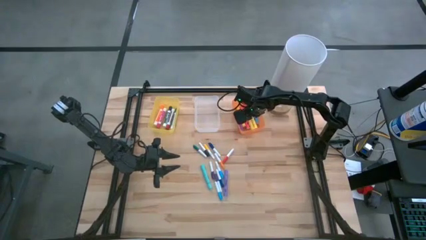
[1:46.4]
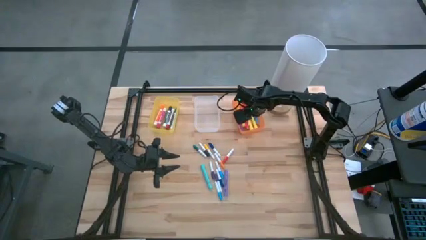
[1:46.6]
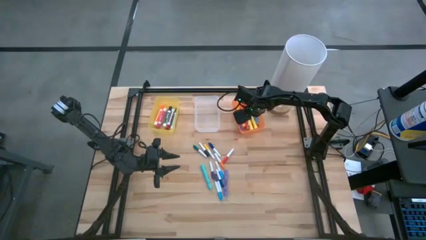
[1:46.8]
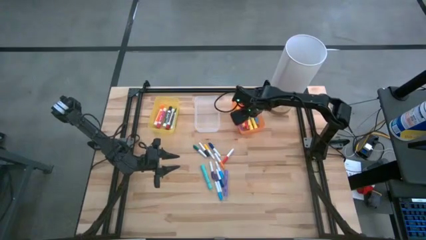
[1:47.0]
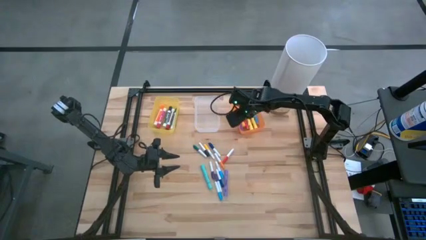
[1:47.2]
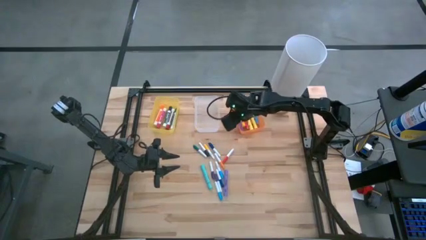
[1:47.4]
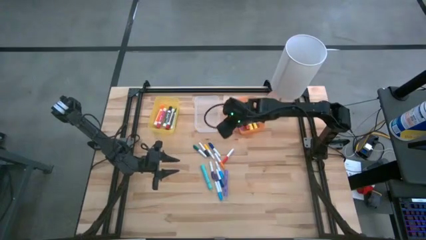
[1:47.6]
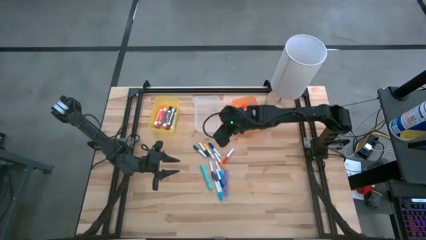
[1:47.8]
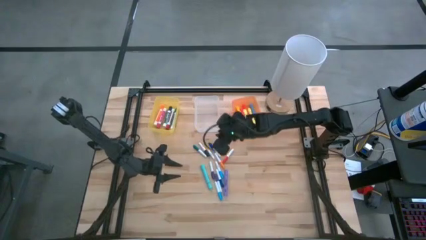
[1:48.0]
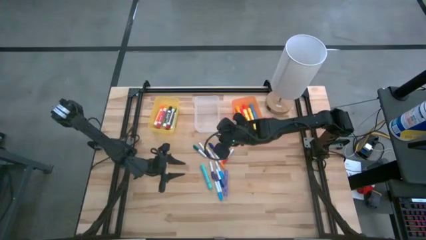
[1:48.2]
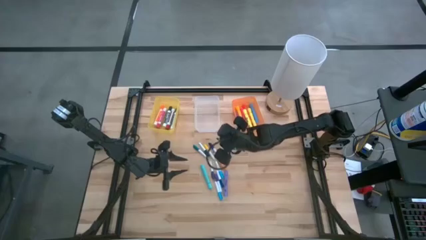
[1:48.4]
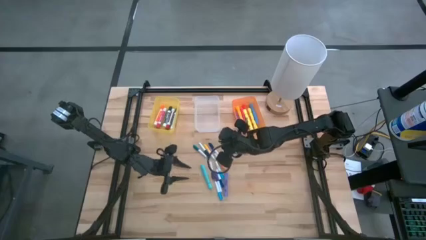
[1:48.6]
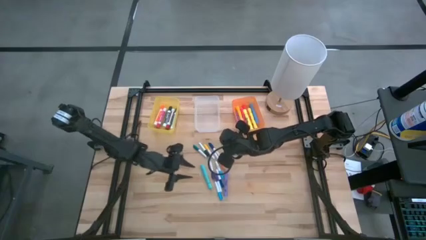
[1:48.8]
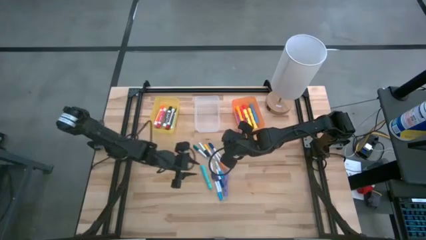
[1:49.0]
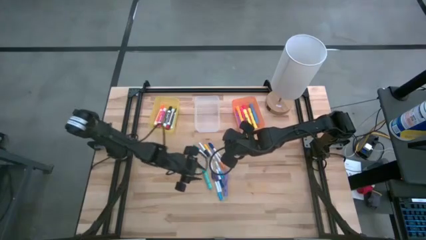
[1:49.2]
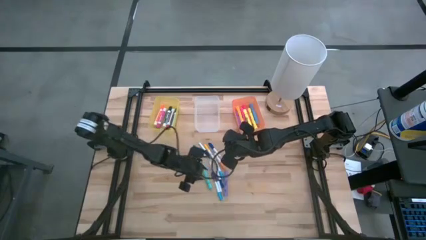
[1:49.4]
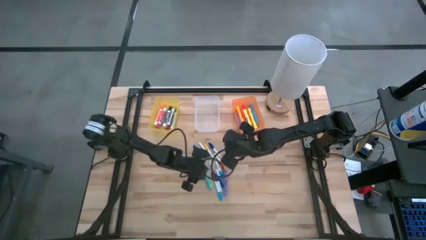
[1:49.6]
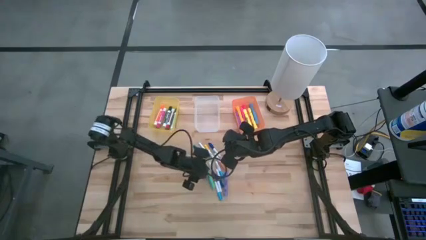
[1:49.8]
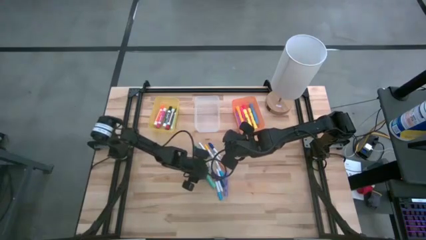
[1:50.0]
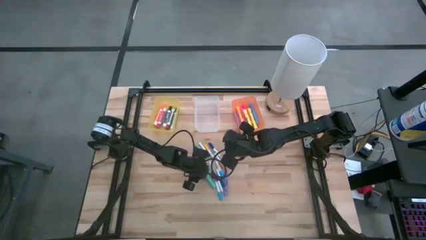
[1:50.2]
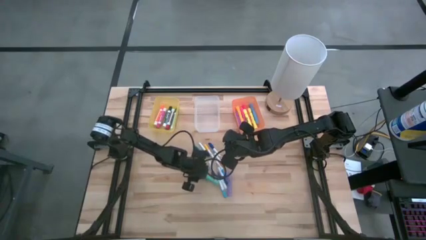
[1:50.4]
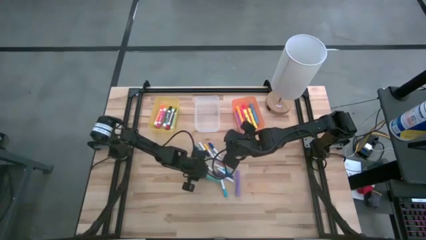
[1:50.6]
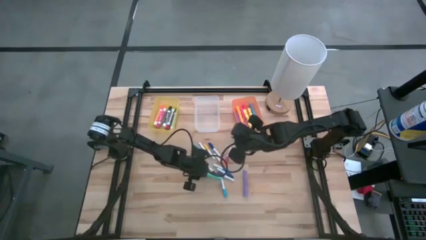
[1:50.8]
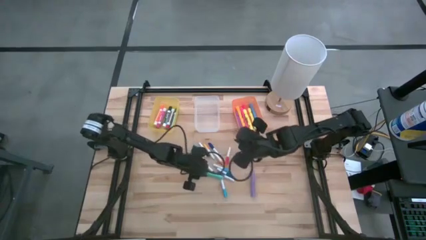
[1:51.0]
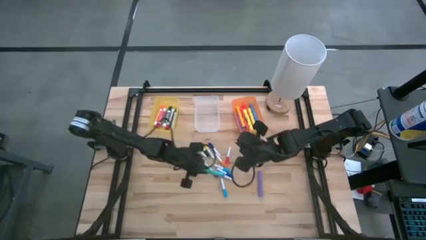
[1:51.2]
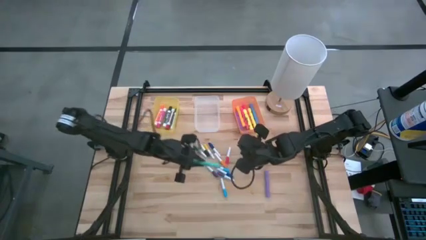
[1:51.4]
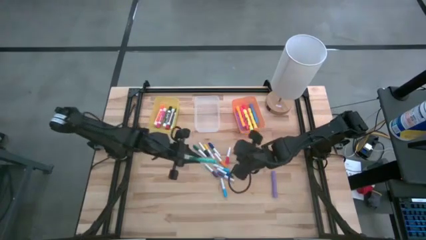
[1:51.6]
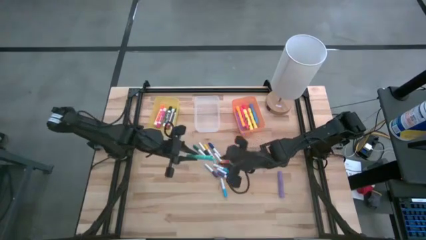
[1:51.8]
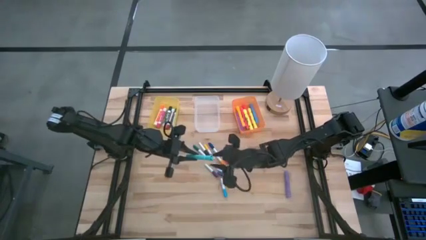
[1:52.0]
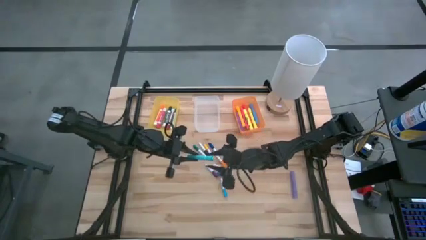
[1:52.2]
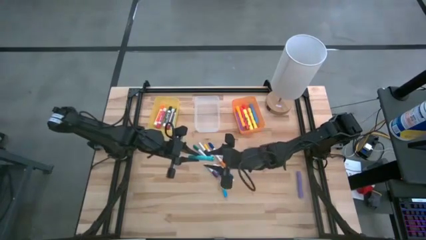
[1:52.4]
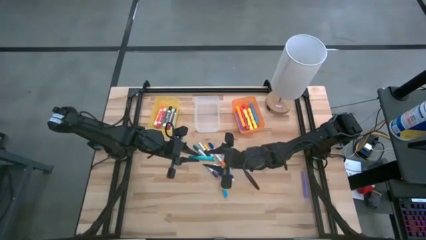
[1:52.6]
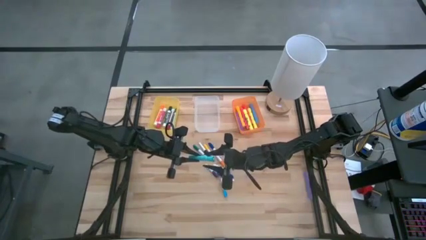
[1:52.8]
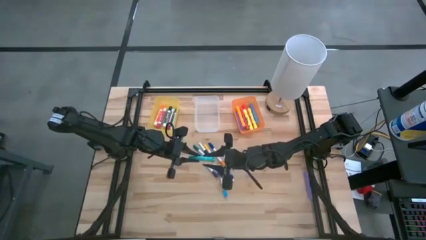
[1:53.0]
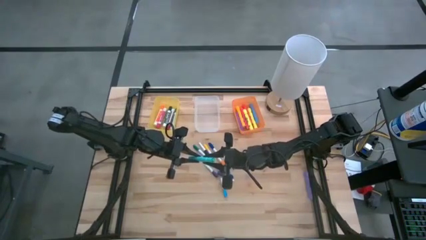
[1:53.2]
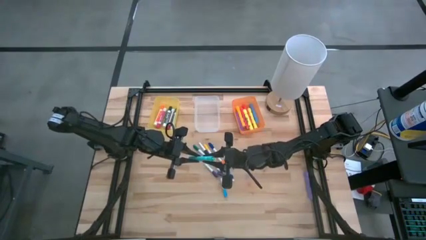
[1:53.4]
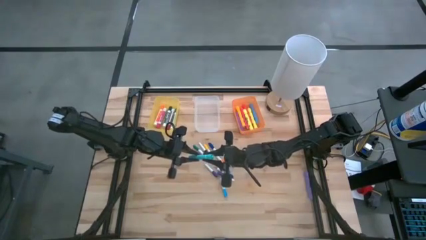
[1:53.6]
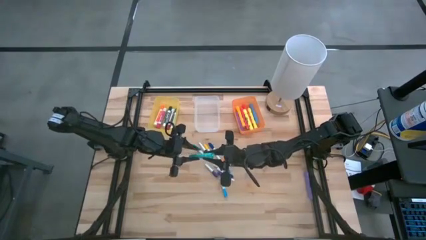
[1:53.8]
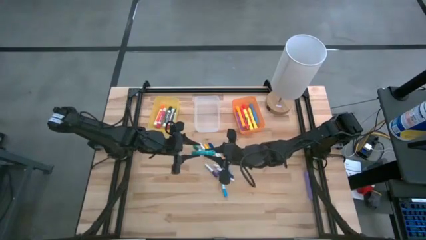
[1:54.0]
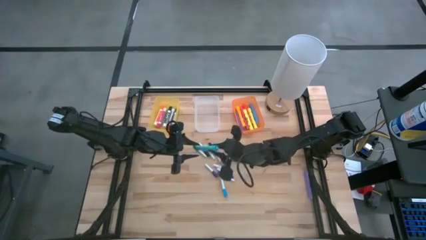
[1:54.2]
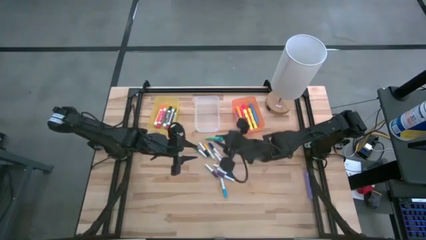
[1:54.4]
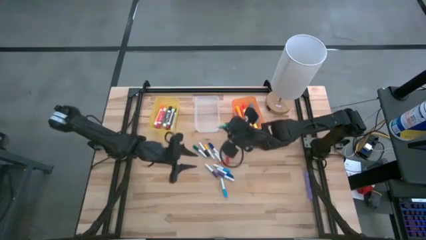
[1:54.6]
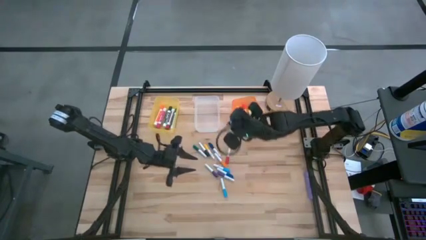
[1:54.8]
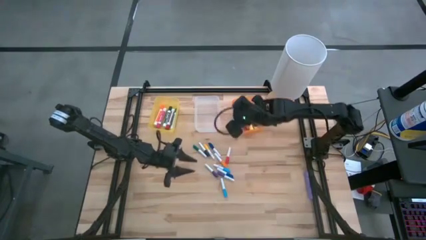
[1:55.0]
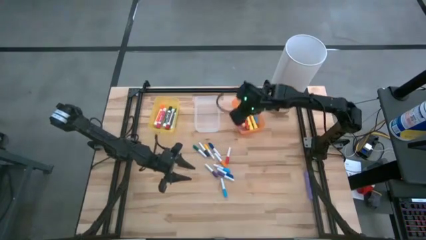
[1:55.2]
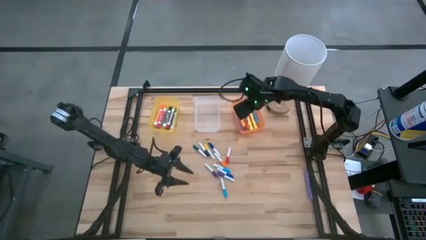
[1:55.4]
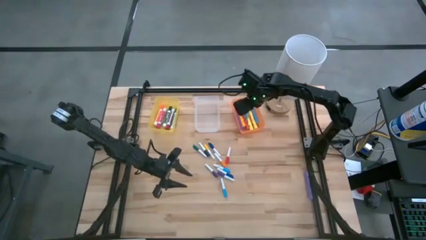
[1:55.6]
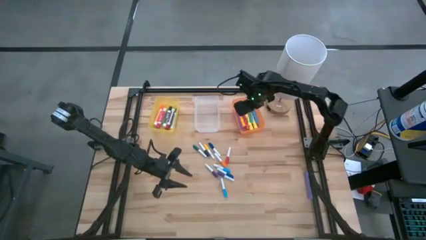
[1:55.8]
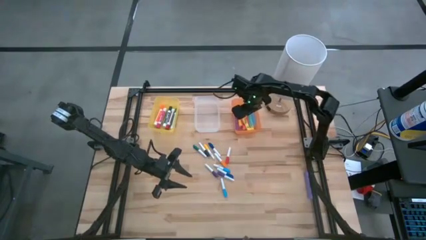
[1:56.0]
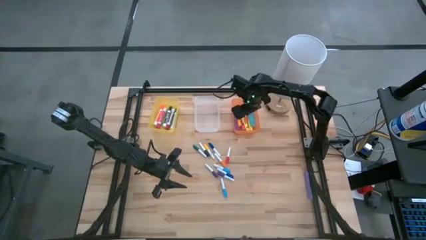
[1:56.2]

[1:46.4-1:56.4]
Task: Pick & Place Markers
Put the large light blue highlighter pen into the orange bin

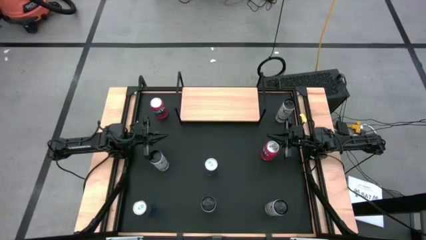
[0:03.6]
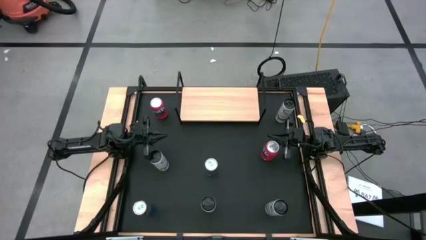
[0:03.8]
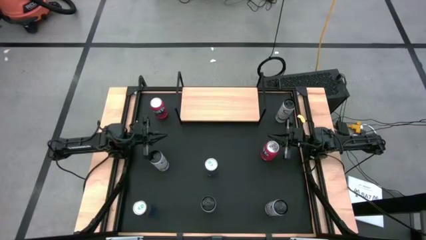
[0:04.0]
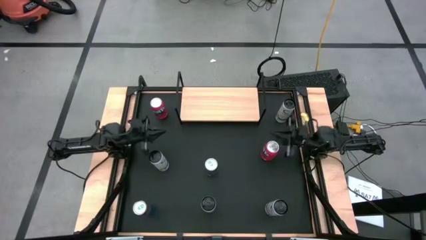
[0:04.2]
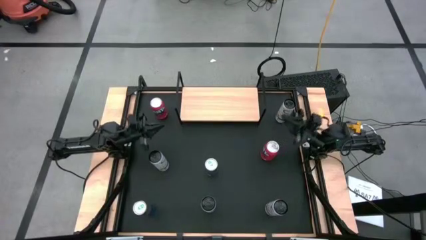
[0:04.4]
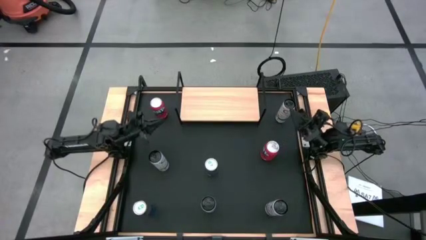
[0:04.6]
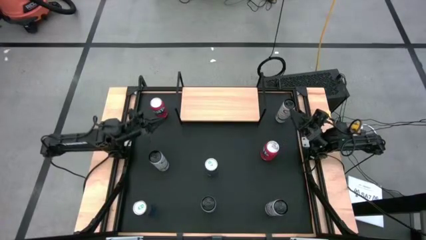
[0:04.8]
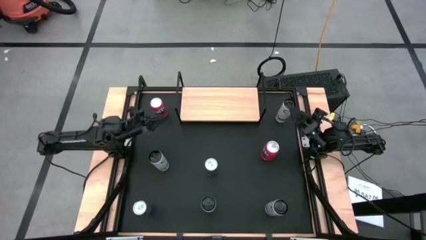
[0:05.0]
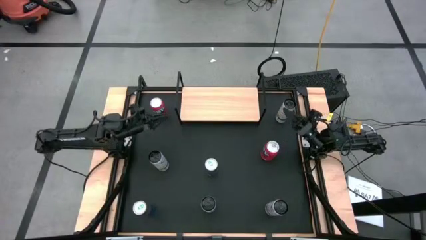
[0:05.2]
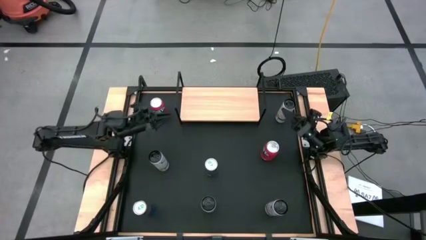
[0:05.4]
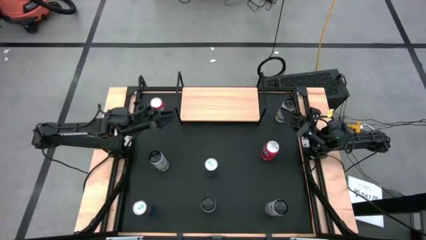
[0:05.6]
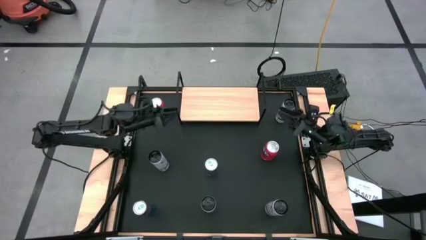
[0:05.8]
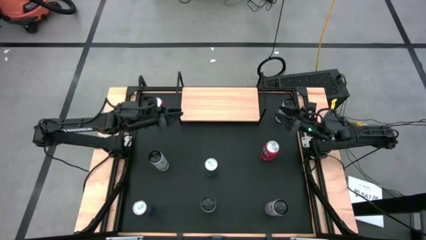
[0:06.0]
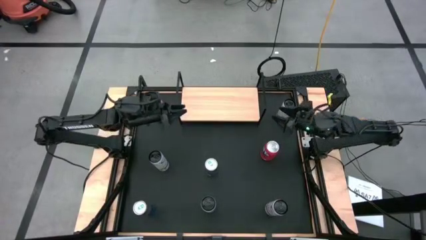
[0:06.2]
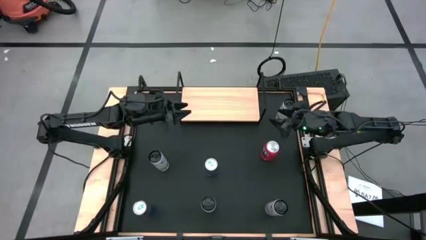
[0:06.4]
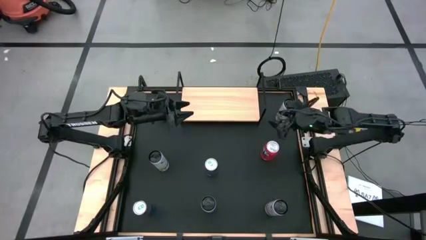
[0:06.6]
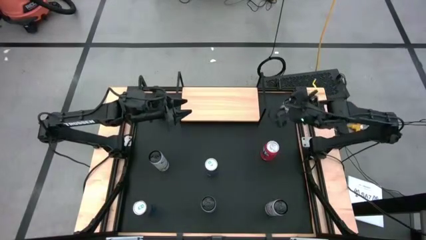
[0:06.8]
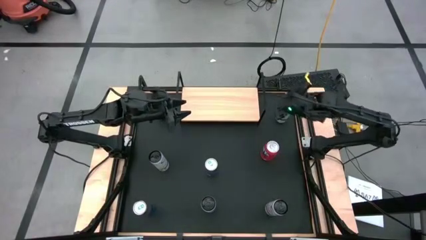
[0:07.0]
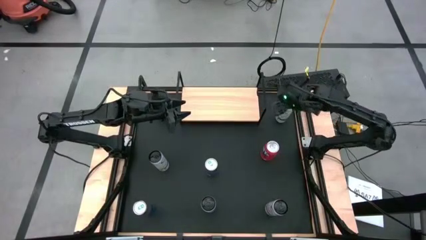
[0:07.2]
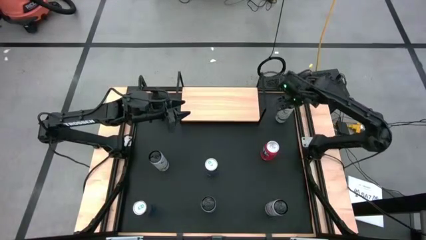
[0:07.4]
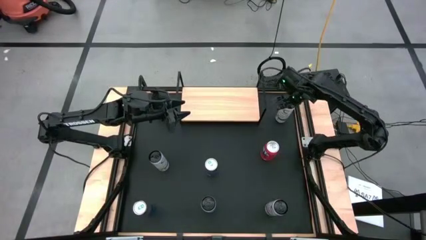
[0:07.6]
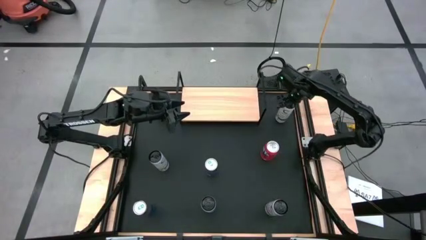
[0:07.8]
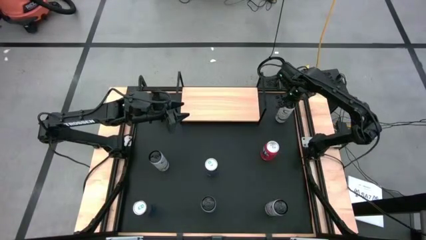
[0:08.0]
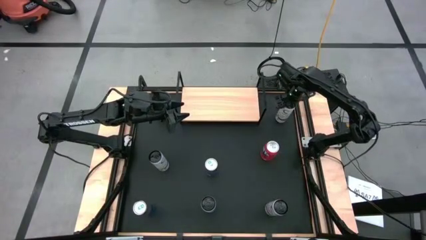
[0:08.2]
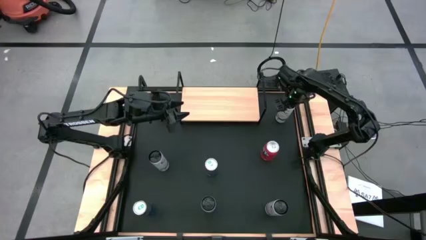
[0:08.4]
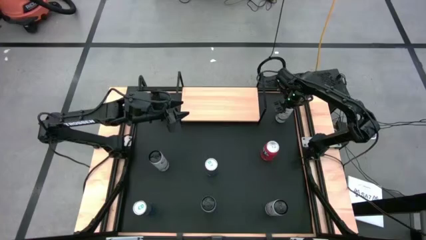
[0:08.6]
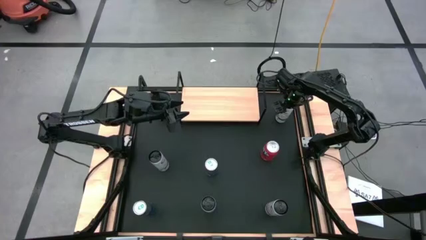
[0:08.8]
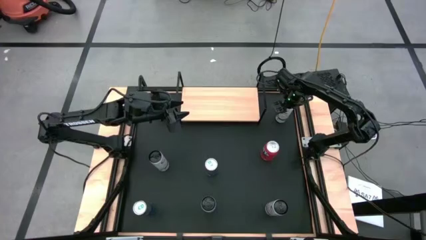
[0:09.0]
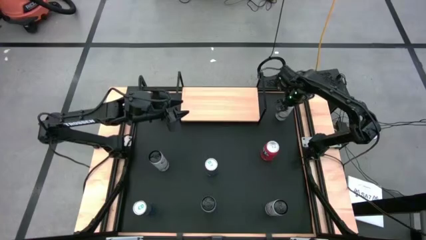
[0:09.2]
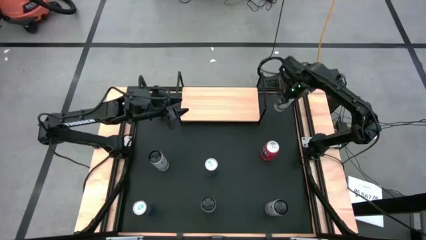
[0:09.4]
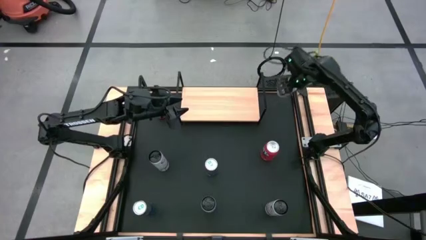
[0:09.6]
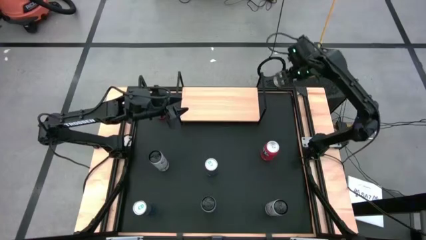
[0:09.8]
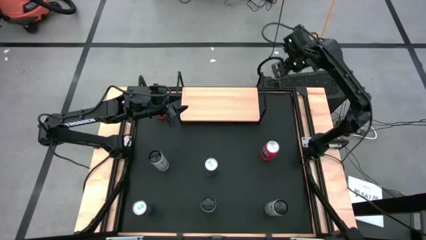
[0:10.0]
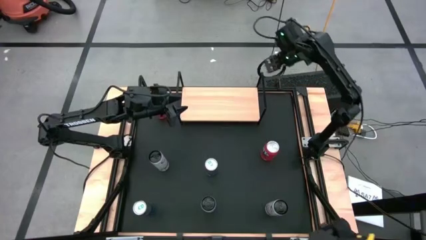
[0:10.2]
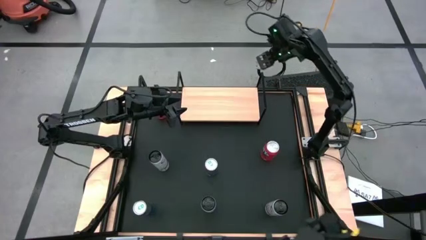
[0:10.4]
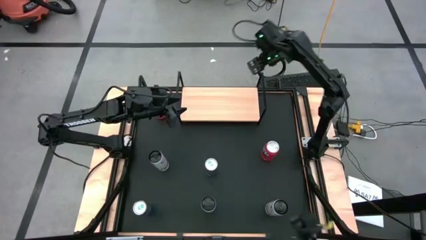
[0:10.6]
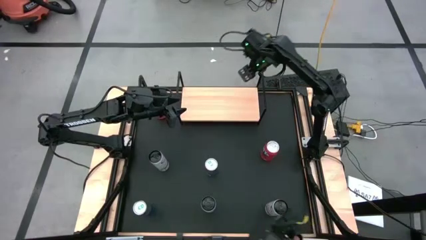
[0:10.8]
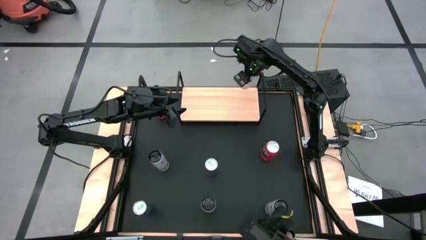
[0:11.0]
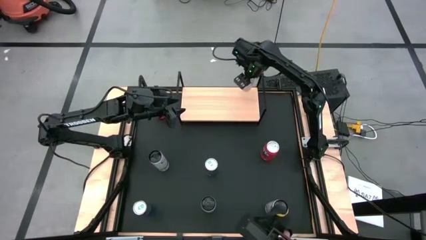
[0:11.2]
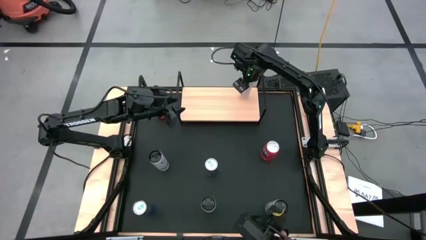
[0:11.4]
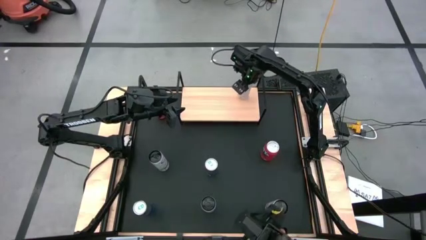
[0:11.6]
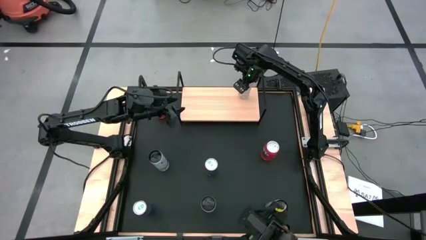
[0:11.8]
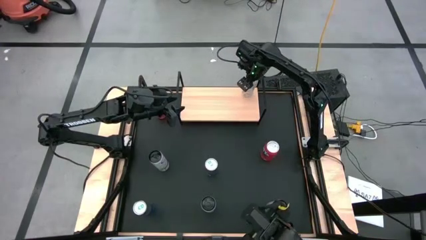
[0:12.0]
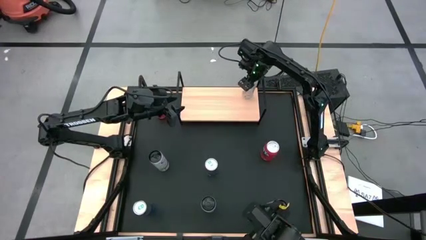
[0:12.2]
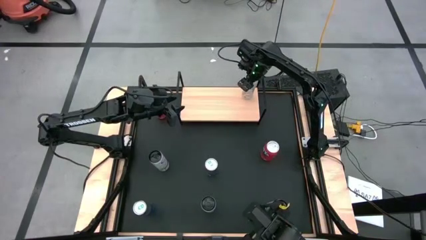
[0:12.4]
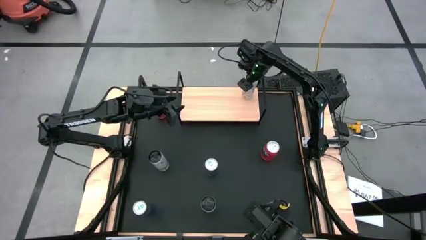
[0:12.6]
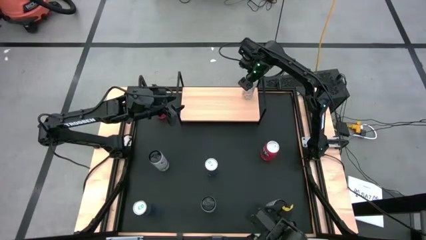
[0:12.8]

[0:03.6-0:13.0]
Task: Place canned beverage on shelf
Put the top white-yellow soda can on the shelf
